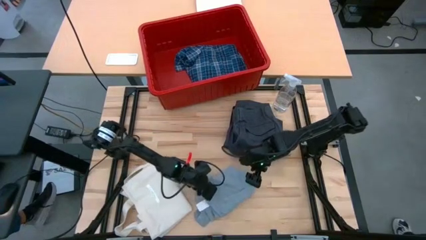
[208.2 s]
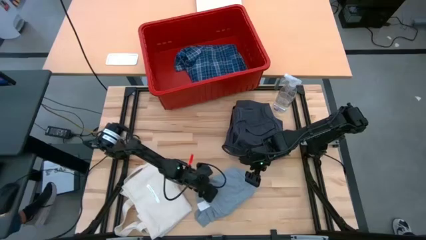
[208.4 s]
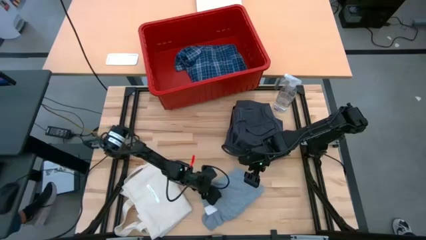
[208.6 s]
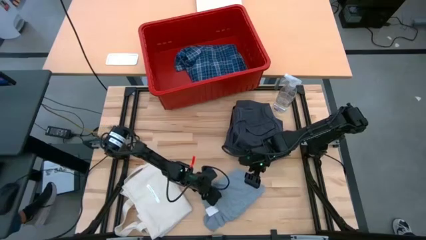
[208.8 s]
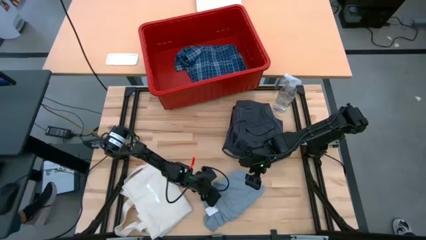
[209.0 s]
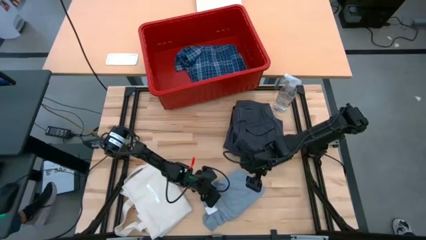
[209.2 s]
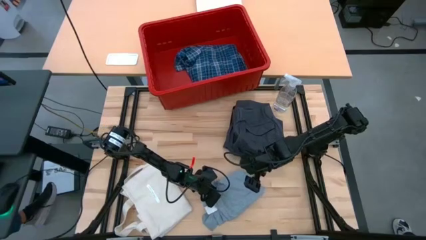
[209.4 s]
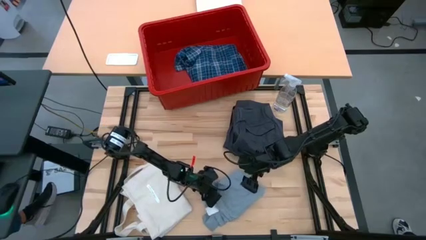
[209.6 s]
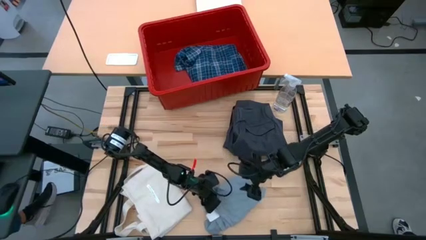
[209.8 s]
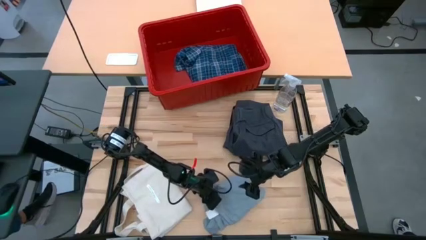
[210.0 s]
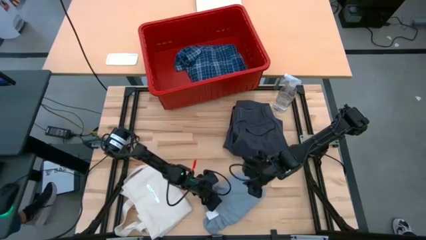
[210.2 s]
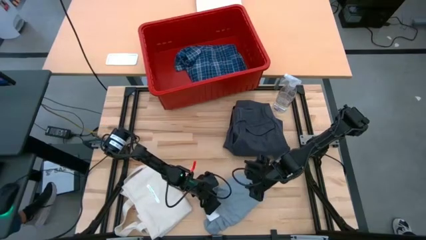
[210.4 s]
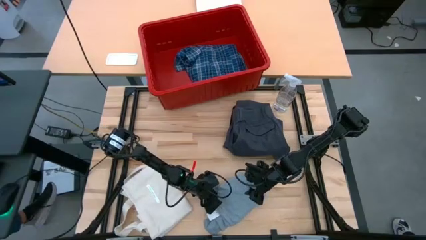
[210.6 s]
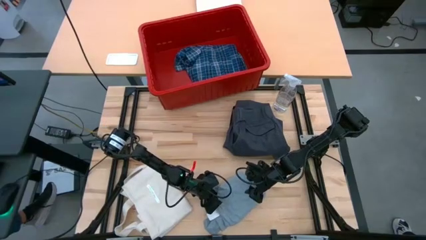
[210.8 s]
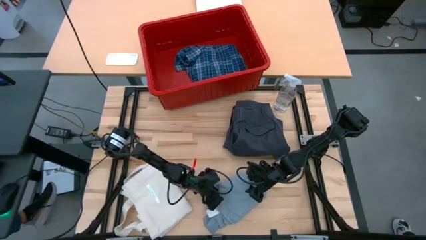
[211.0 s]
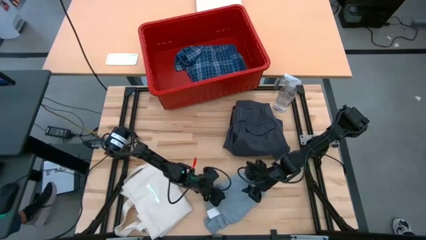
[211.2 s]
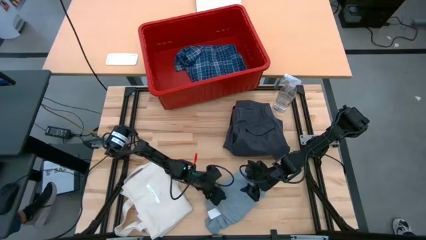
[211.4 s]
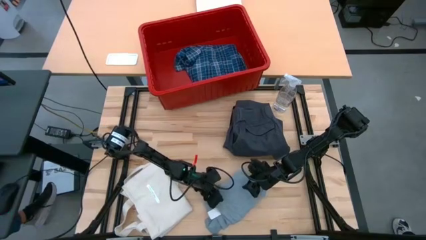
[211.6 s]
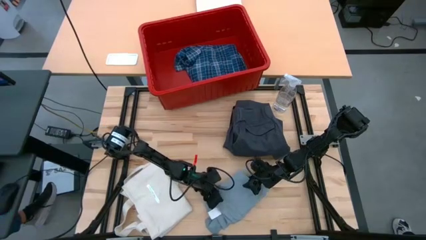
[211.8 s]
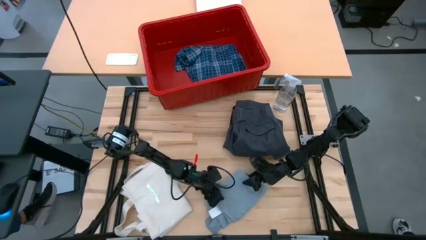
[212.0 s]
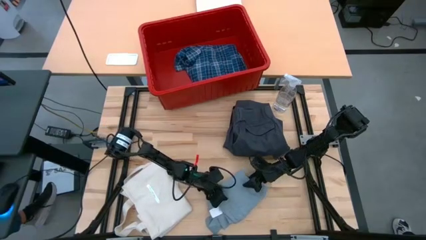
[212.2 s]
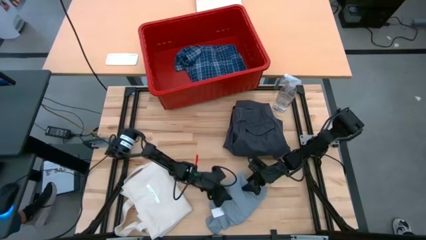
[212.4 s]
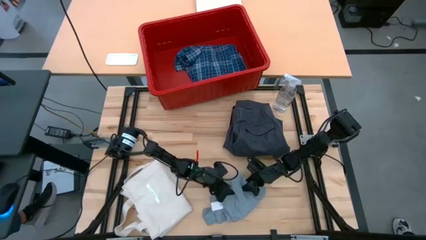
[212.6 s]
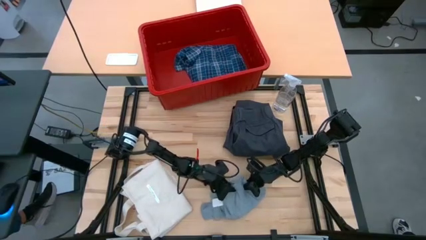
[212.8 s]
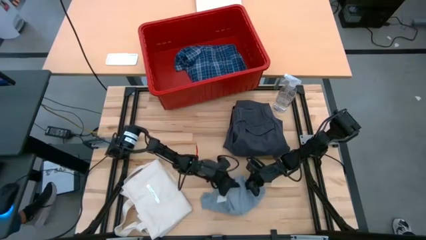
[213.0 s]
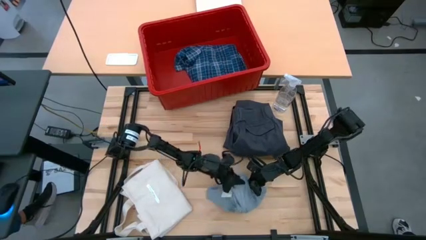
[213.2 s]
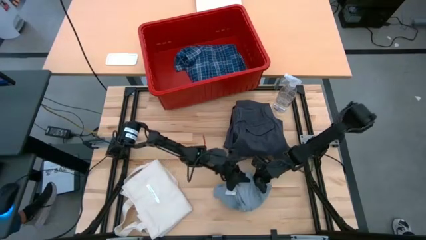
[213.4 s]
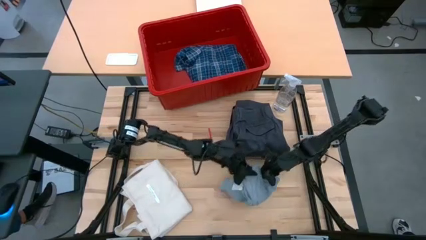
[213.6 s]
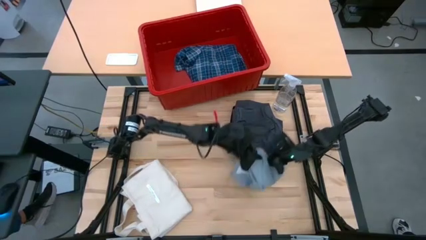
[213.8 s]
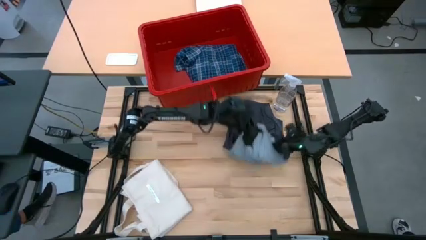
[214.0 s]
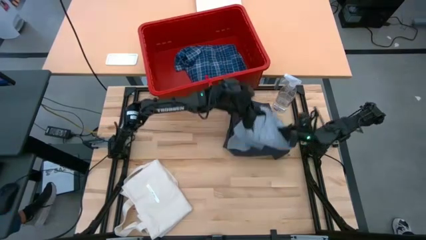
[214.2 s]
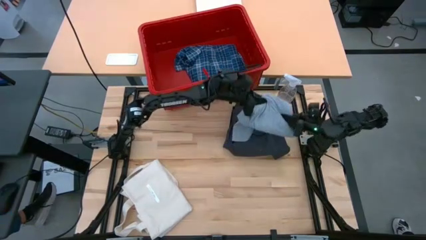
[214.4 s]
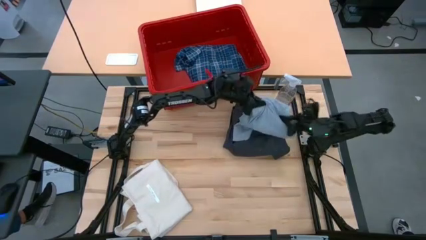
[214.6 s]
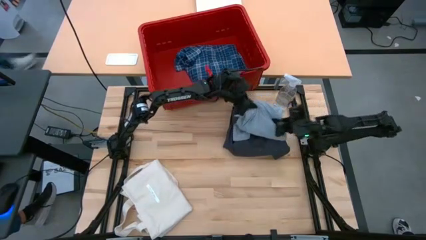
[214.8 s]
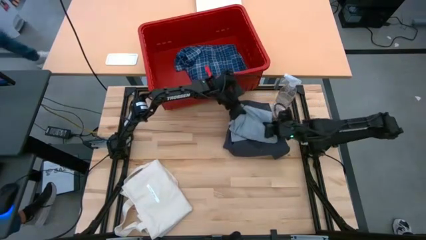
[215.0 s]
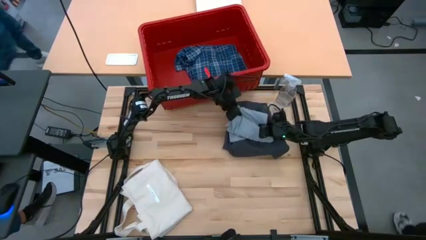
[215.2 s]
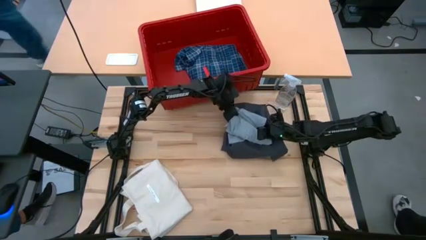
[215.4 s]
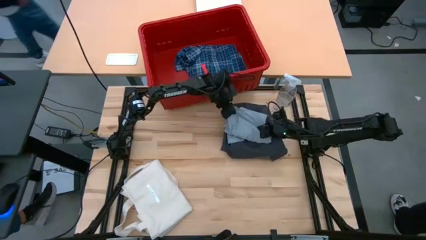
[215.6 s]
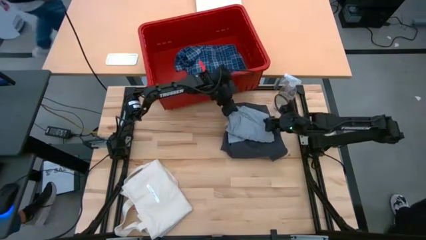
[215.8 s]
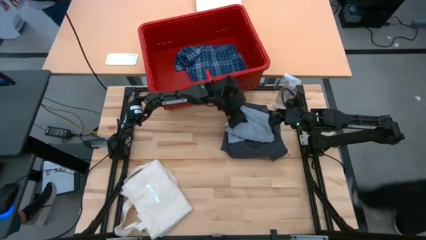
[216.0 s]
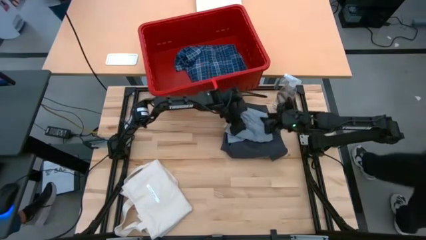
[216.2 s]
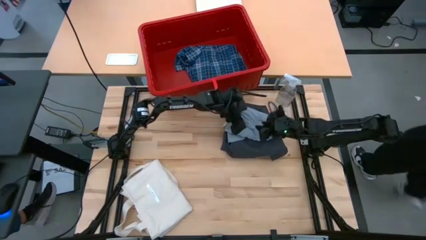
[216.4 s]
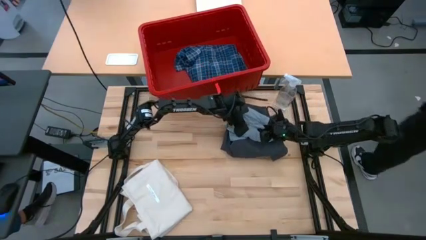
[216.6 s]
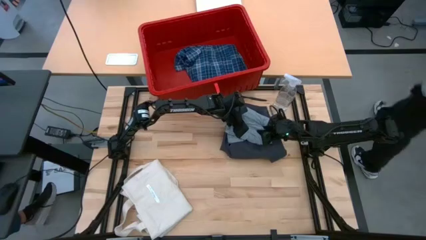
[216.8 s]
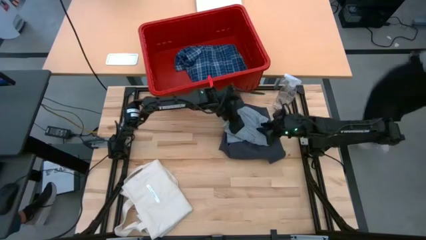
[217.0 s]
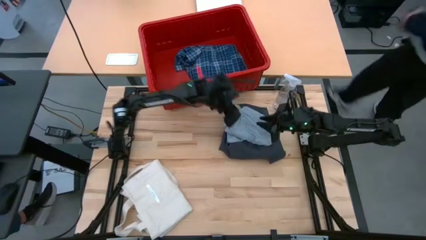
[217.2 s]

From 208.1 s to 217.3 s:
Task: Fold Laundry from Bin
Stack the folded gray shirt on top of the folded gray shorts

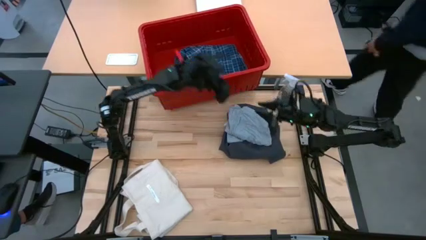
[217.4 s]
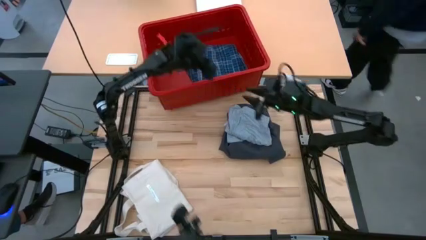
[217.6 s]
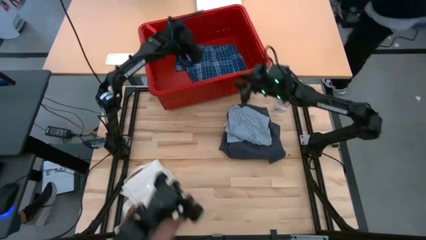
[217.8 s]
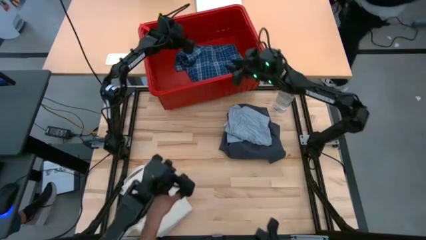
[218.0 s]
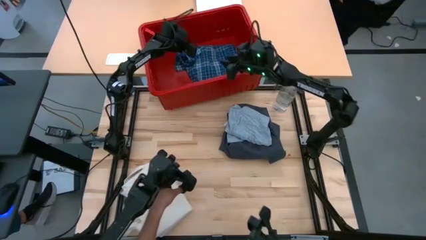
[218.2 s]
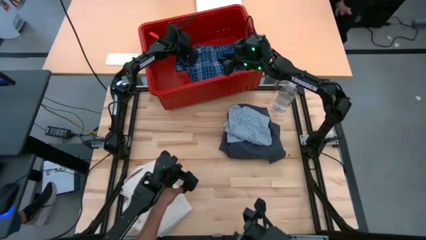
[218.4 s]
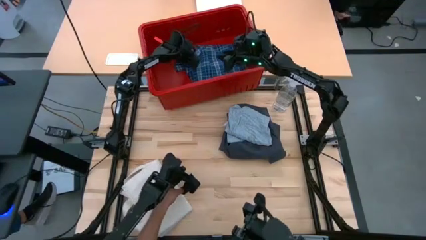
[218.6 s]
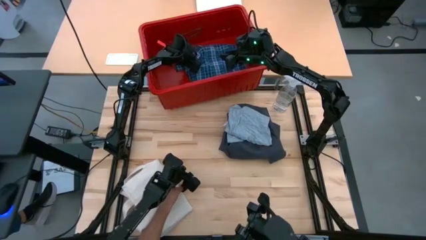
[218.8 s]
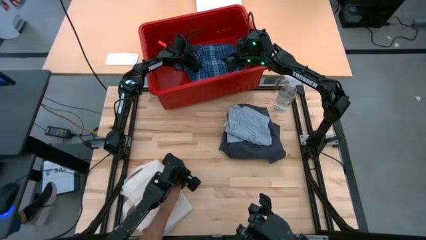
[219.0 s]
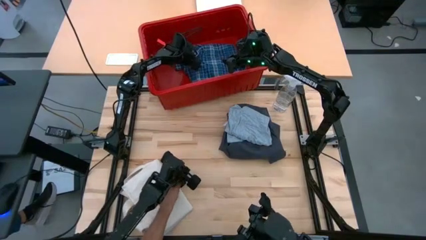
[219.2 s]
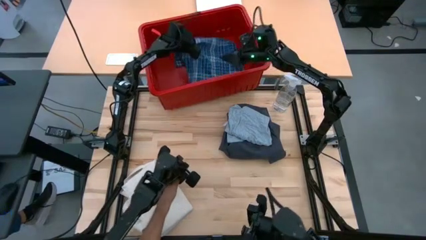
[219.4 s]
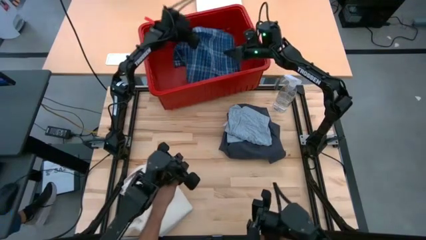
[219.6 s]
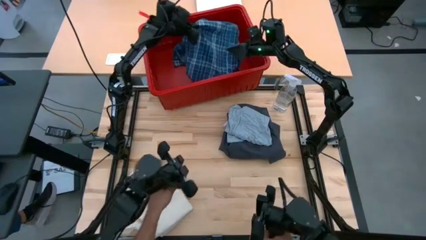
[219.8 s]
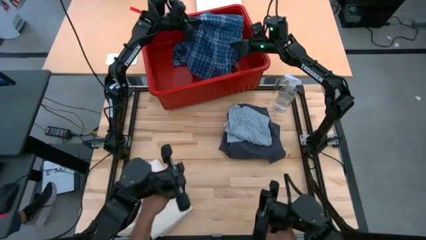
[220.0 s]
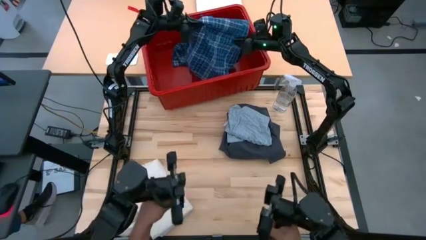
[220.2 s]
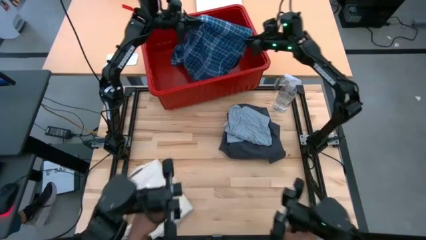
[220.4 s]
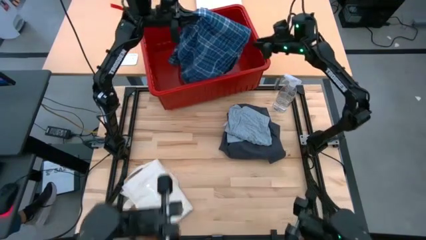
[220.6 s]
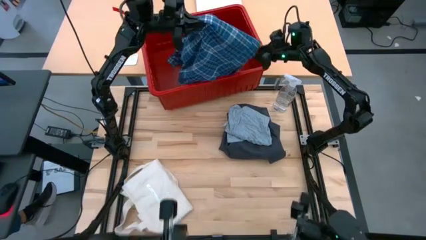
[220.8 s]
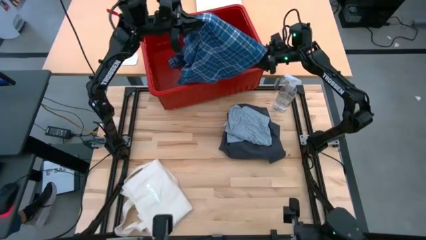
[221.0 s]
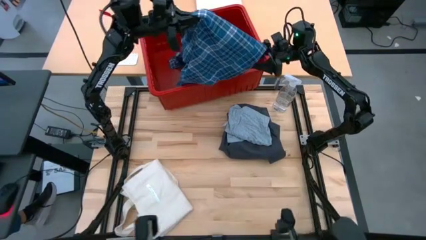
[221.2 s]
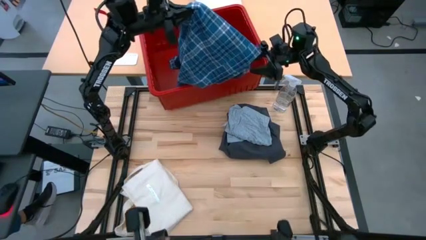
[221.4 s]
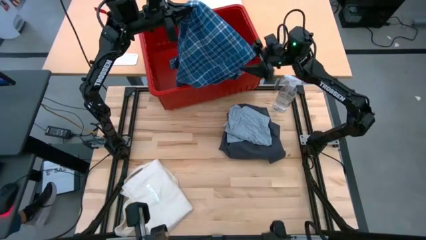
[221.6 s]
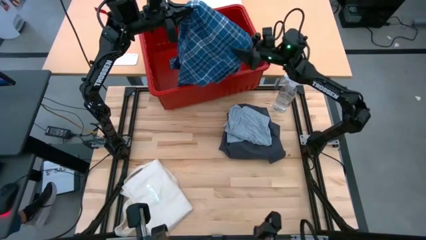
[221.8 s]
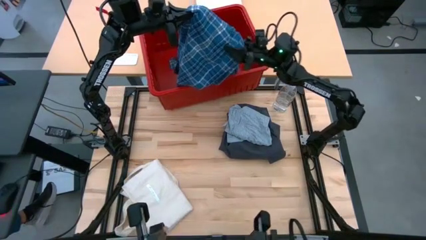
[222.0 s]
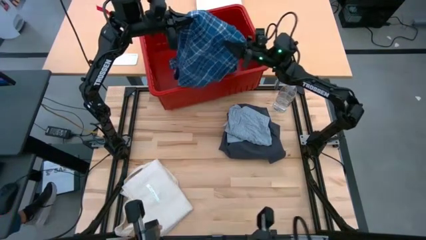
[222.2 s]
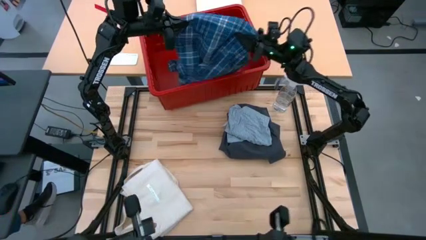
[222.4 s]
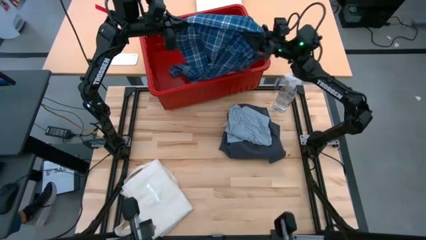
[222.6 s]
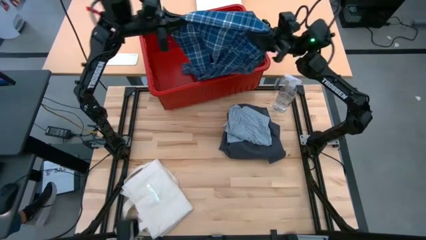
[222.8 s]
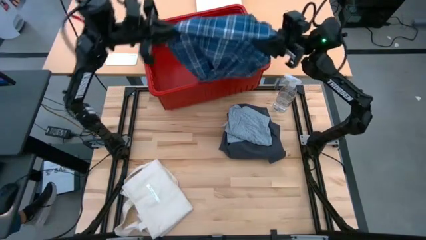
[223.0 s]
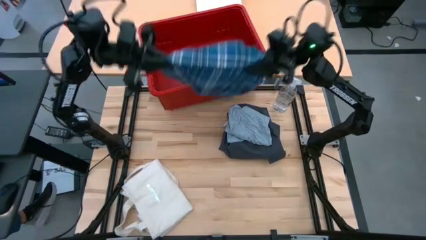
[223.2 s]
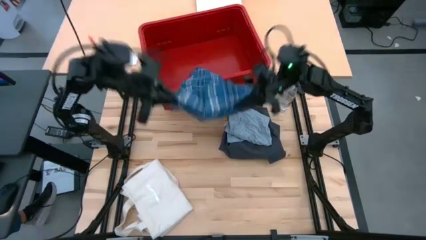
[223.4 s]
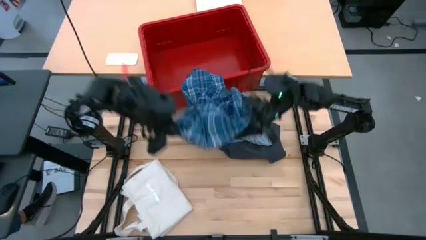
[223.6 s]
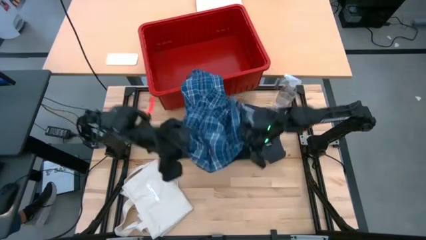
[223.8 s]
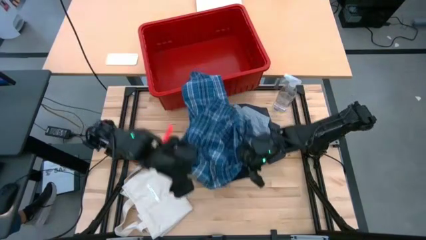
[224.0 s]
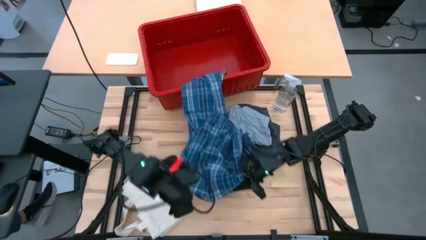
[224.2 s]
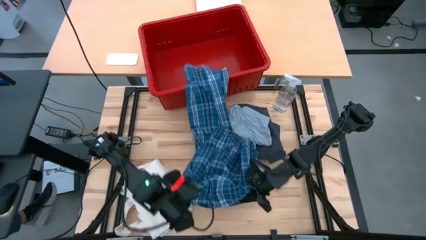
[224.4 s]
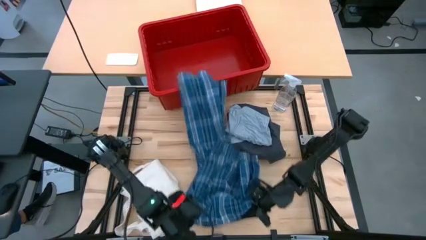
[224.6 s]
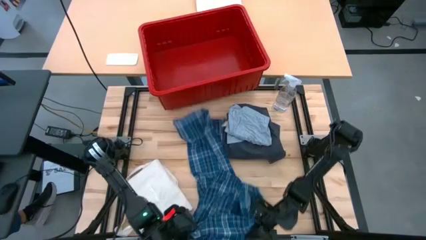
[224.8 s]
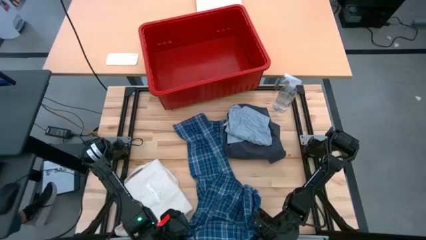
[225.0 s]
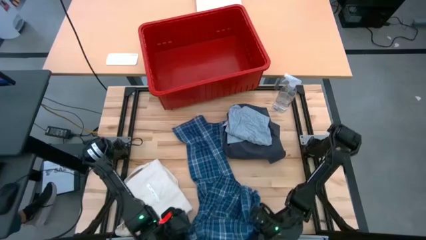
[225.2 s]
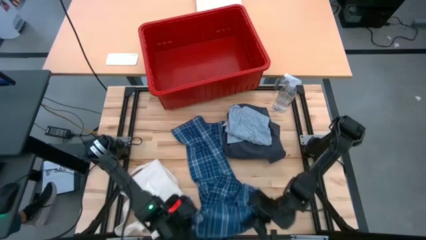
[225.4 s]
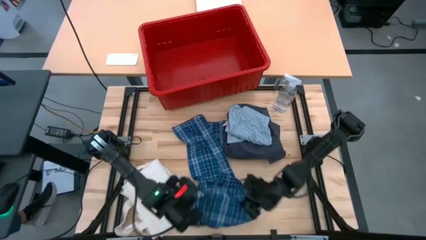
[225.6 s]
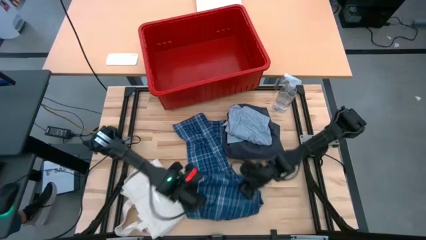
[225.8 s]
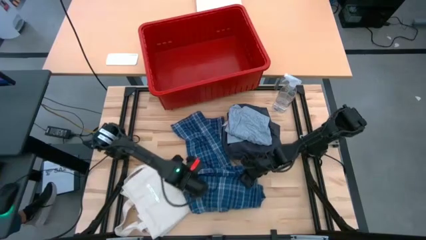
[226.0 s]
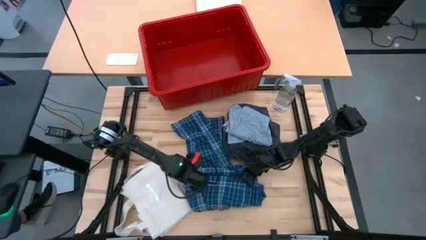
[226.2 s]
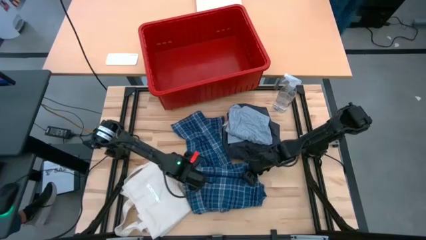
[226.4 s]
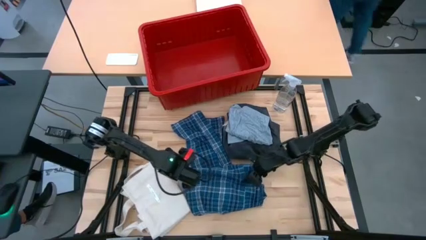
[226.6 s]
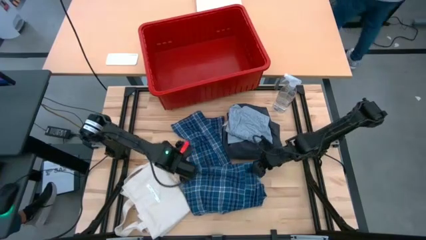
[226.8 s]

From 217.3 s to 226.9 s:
Remove the blue striped long sleeve from the red laundry bin
